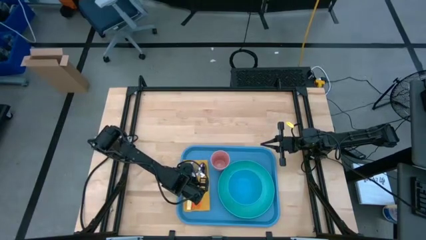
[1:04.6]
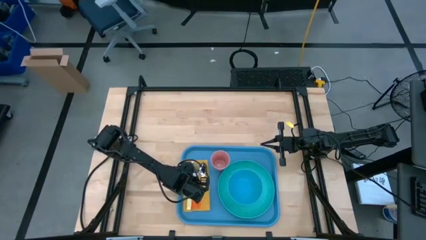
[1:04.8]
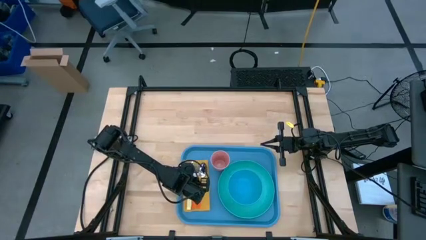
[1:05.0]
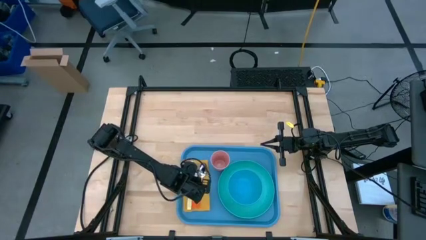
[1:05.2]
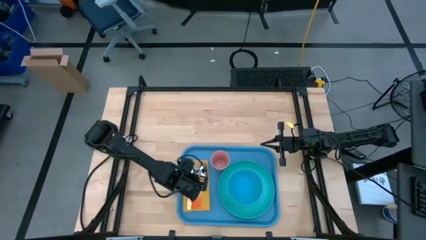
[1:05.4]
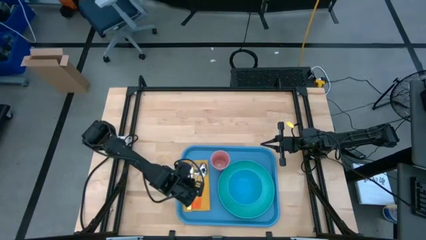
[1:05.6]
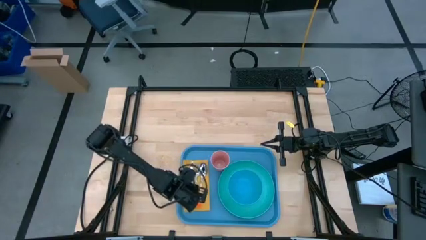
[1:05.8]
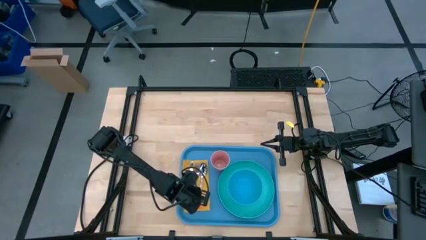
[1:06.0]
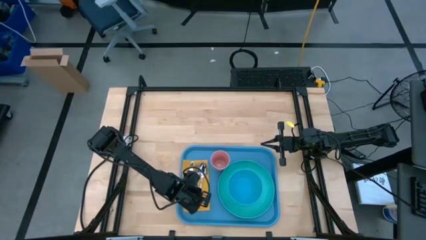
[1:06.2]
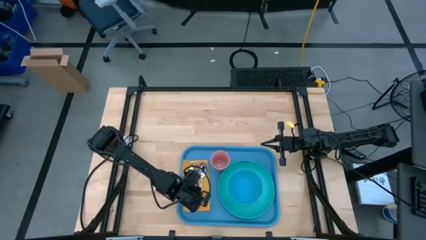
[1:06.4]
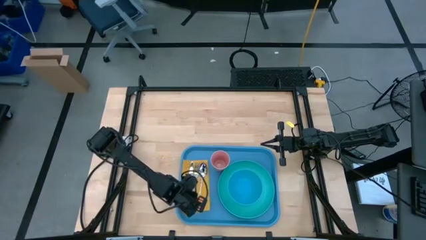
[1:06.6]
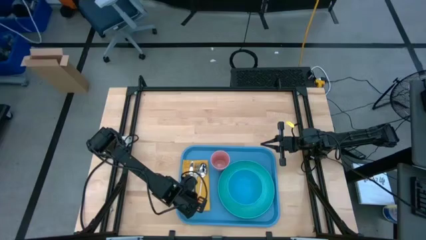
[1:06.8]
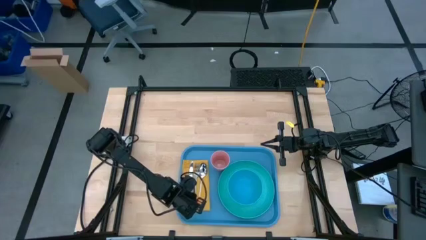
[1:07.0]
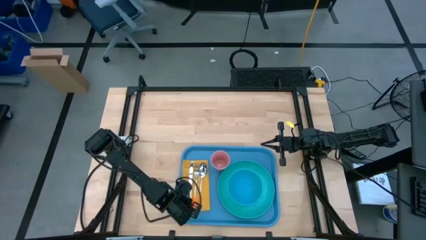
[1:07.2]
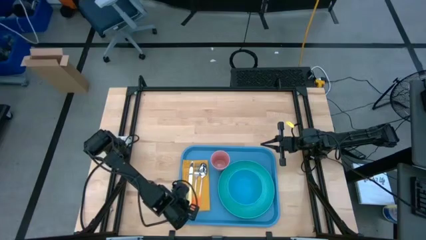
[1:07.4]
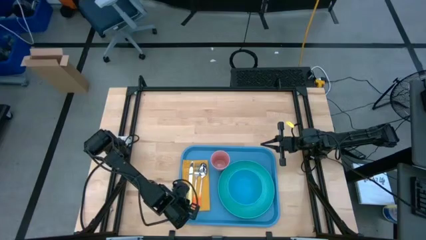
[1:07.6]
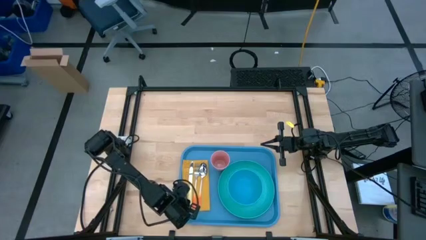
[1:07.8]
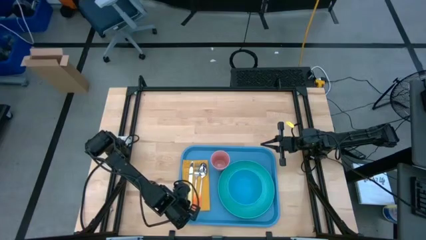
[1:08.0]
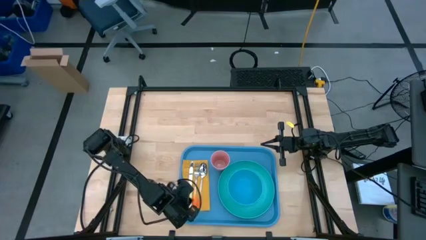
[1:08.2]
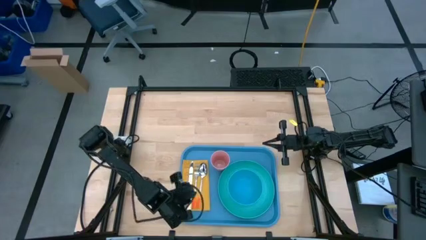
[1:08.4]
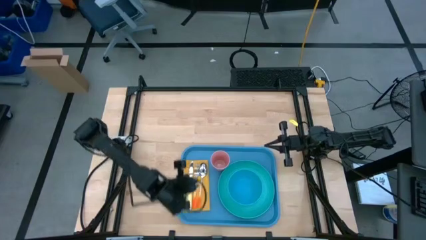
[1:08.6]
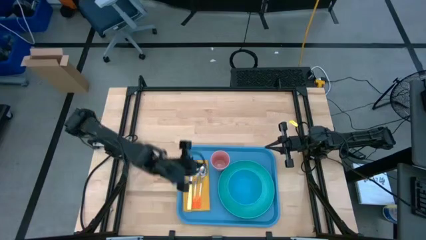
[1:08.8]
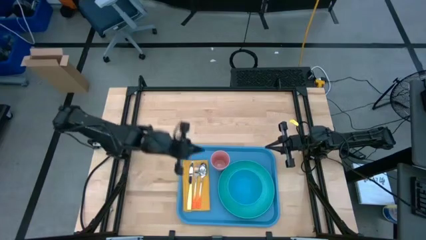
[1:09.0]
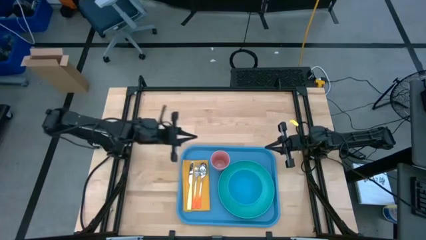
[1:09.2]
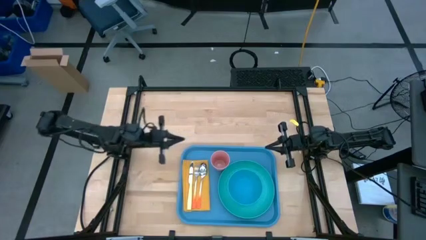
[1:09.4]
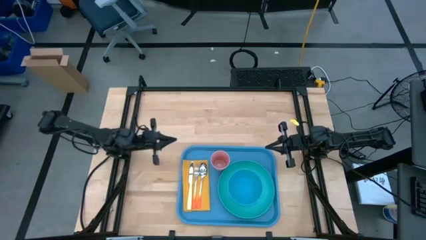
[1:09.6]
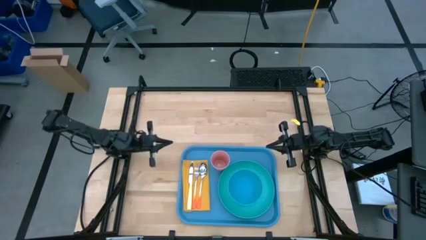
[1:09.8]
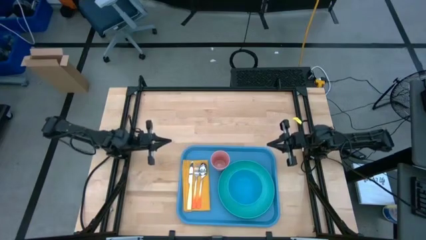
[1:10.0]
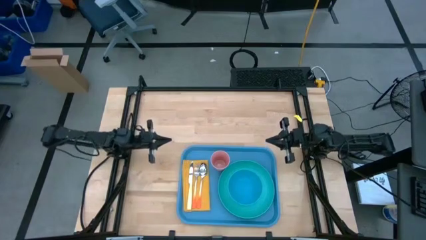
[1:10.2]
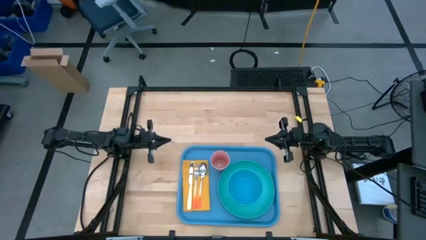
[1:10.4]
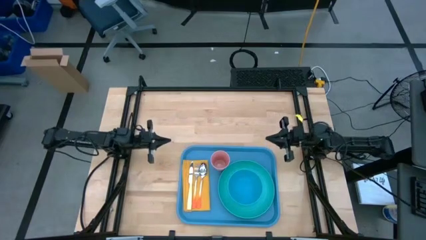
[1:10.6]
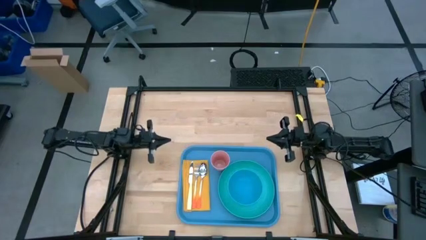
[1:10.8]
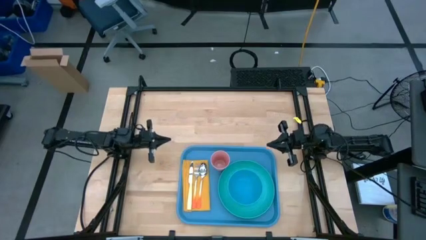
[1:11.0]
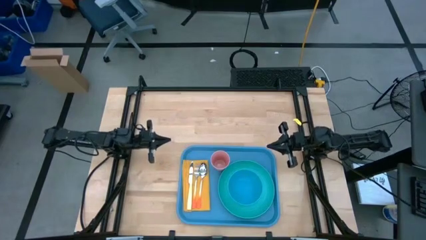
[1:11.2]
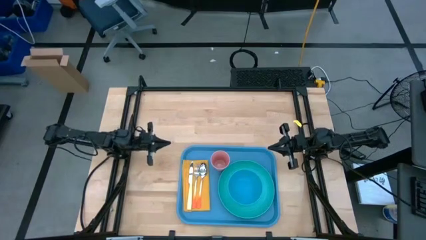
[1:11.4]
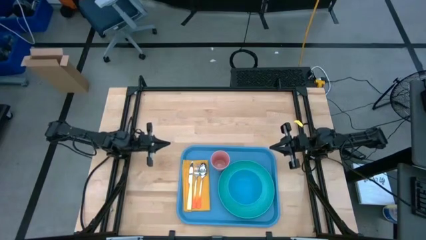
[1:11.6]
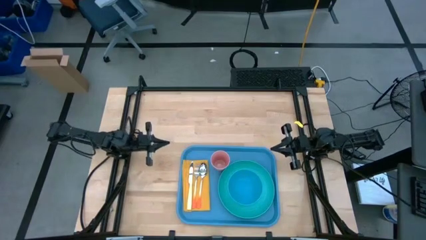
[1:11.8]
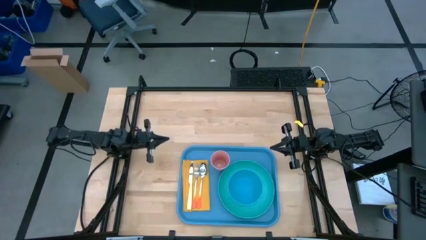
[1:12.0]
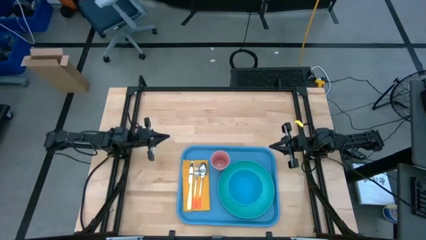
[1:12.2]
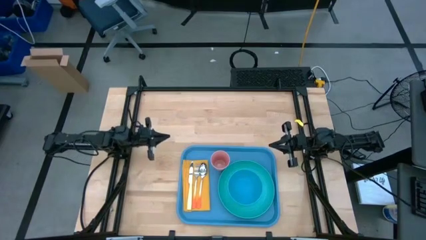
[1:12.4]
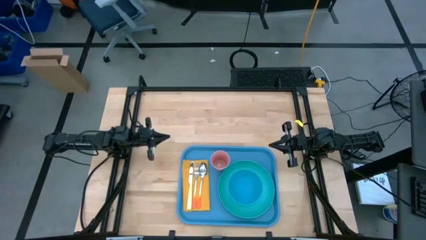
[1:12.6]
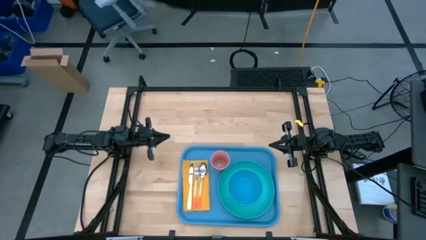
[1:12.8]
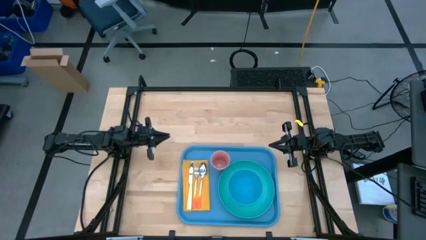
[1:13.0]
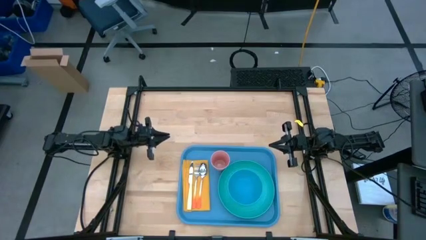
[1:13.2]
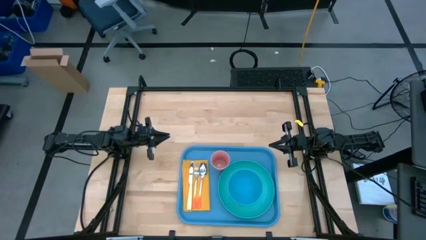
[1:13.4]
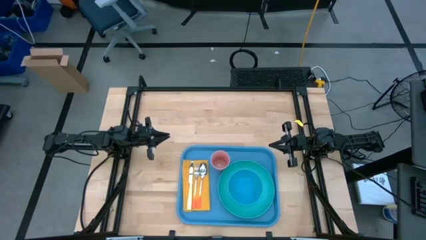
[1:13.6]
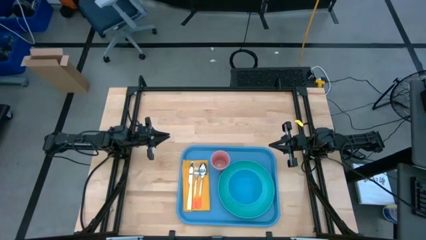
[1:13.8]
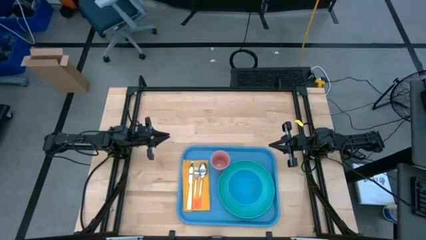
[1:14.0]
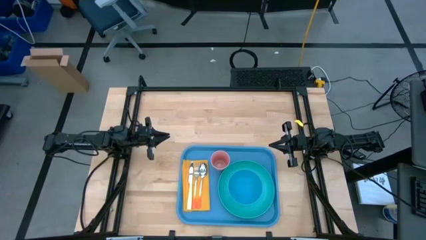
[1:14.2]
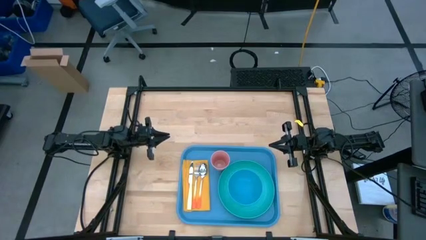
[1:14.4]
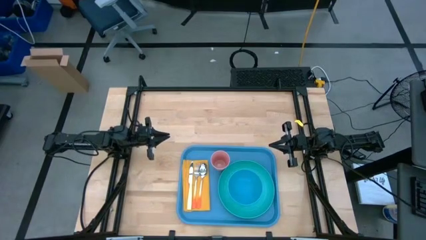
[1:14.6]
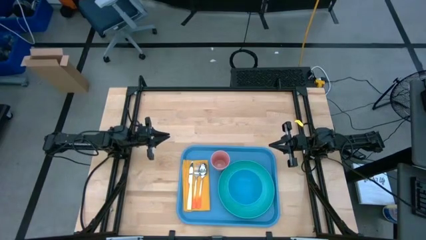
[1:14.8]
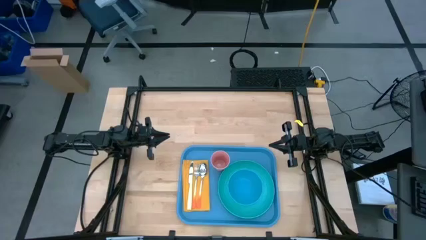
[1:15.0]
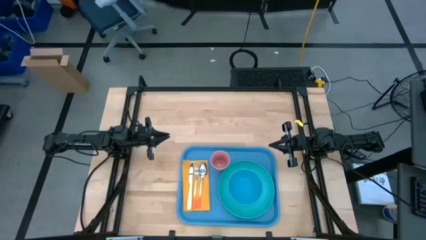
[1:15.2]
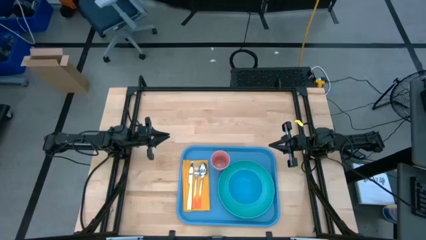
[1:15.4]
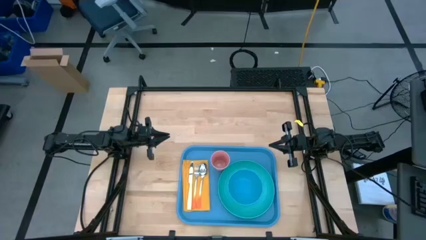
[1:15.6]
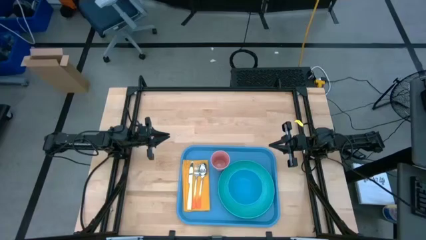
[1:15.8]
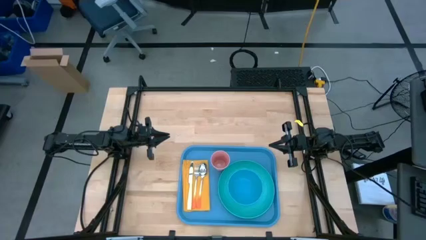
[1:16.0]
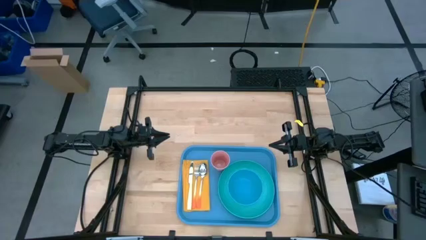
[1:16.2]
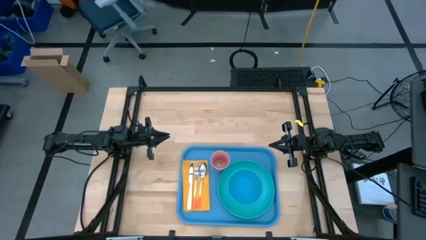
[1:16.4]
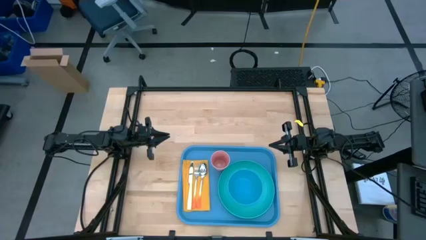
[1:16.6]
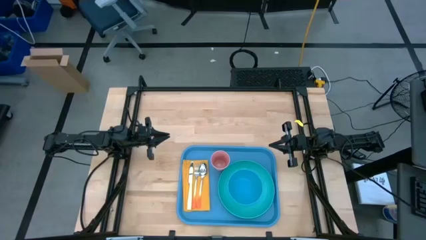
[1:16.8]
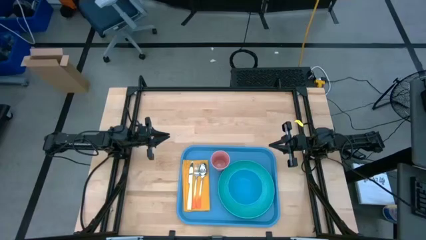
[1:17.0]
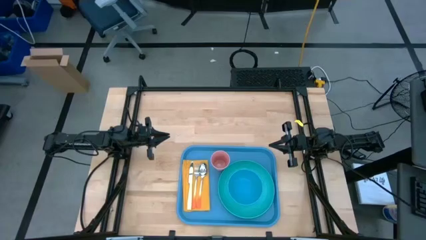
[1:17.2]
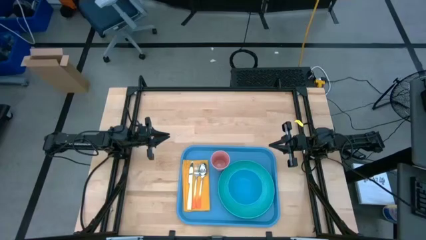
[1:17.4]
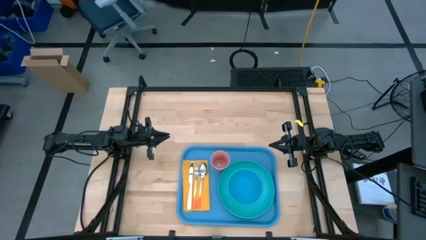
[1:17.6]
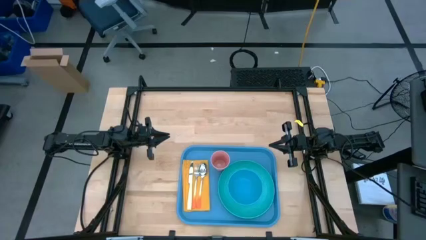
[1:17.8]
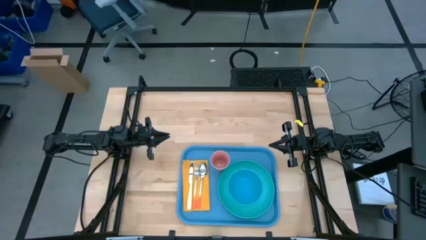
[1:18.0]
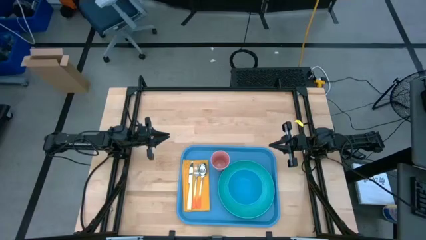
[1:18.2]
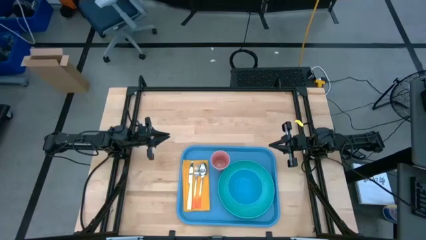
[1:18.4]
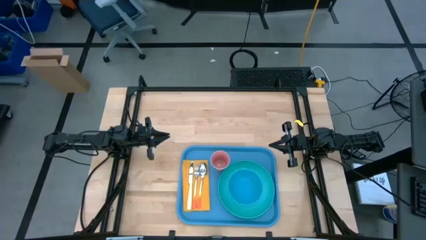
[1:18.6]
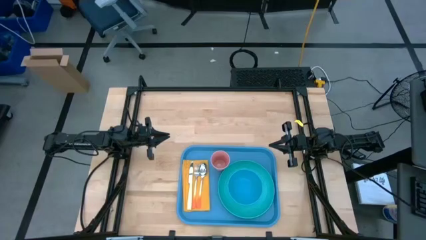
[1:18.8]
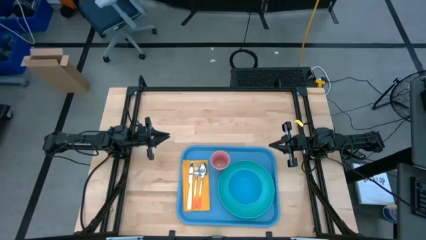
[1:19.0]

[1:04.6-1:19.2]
Task: Set up tray
Return to Home Position
